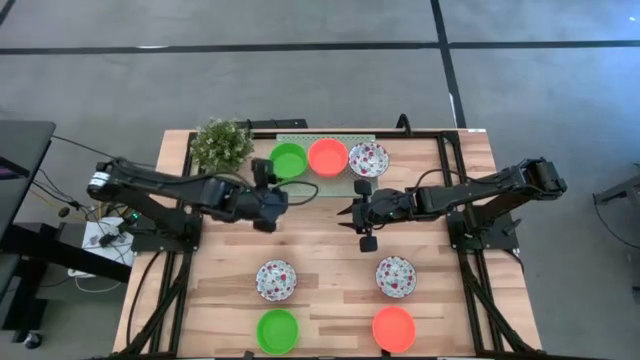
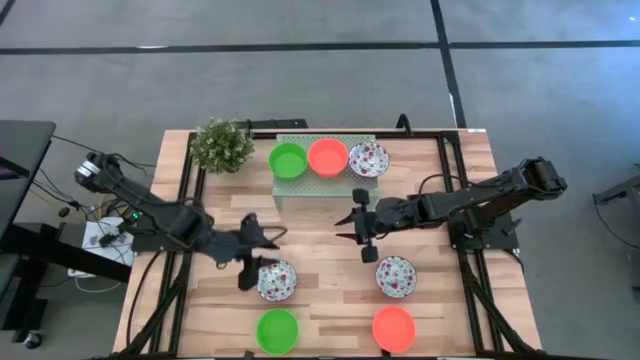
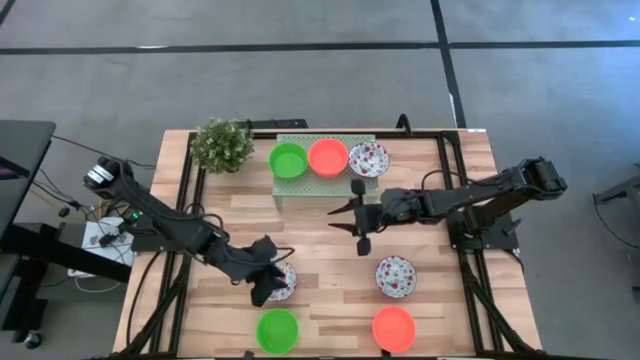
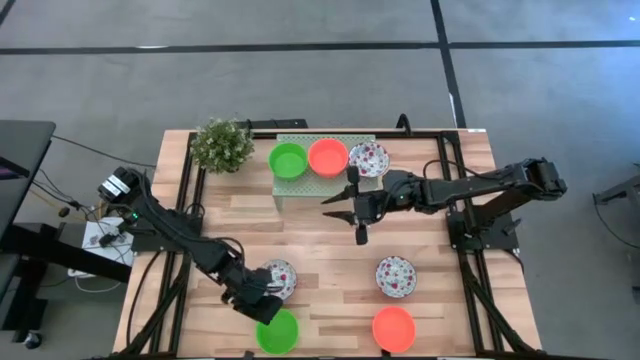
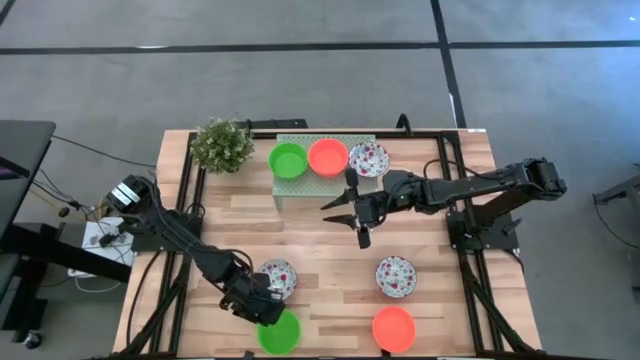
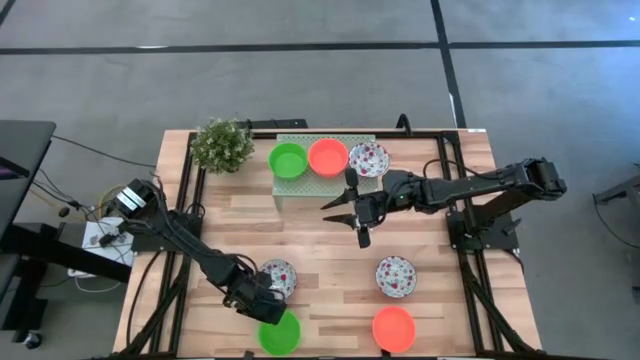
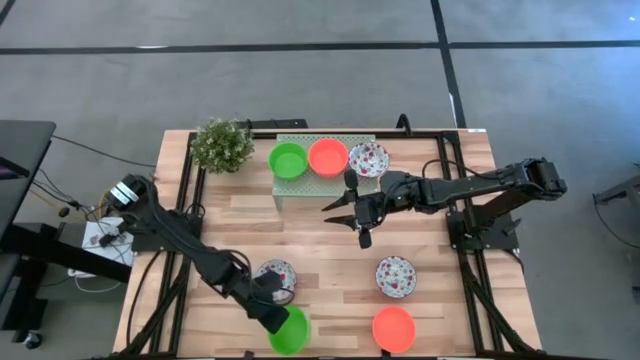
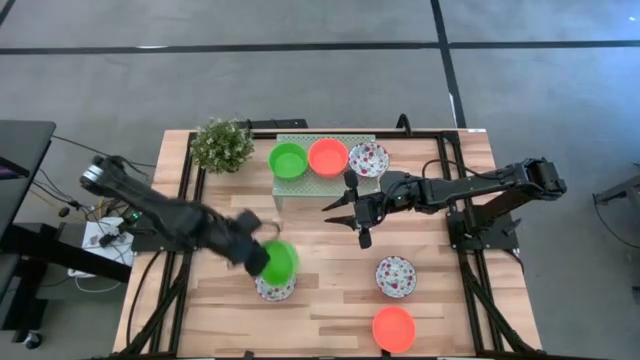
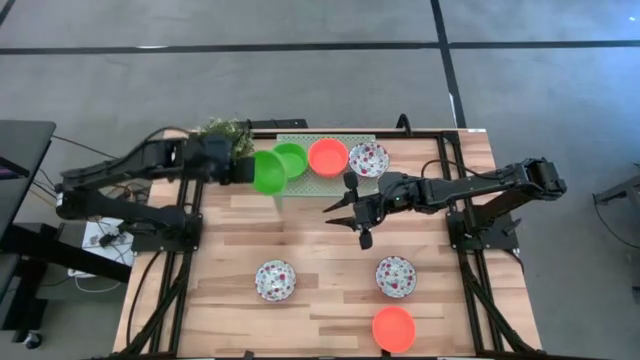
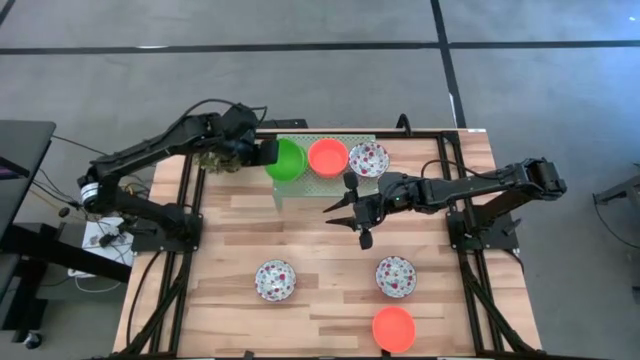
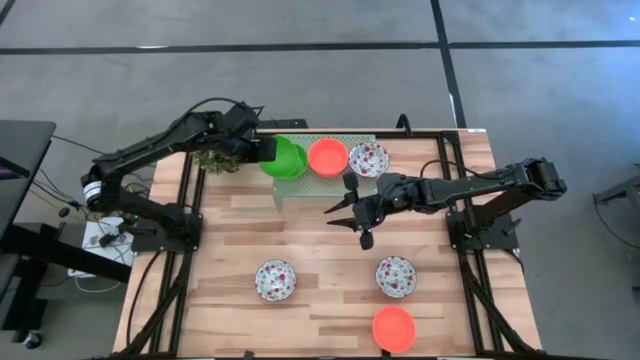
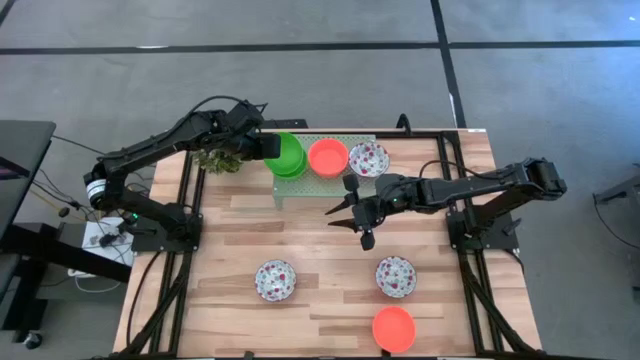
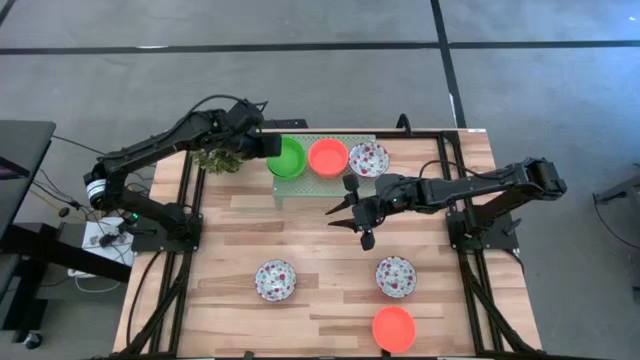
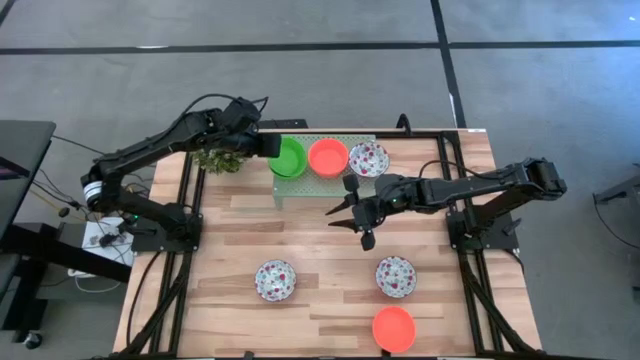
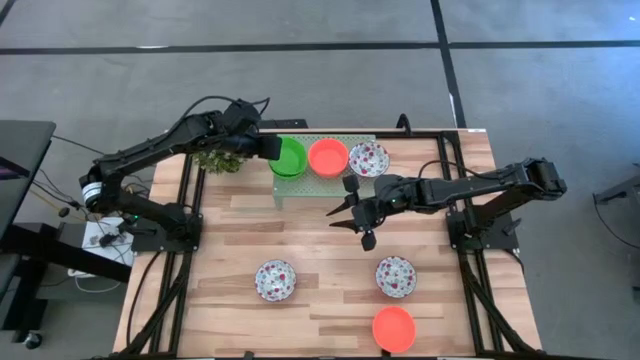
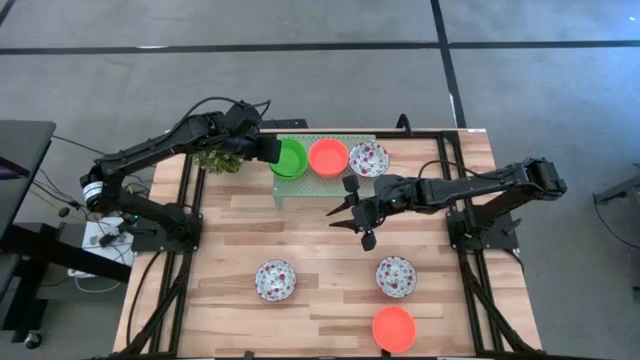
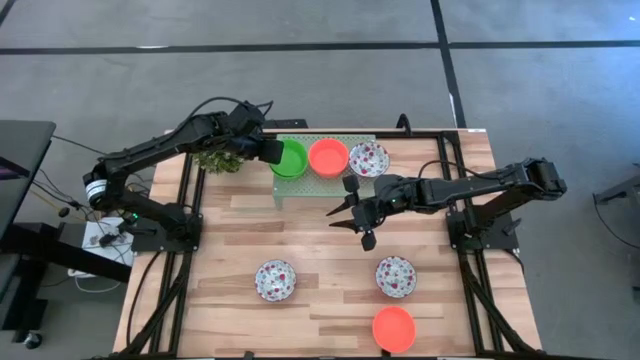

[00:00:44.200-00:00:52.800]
Task: Pick & Place Mini bowls
Stack the green bowl on the green bowl on the shelf

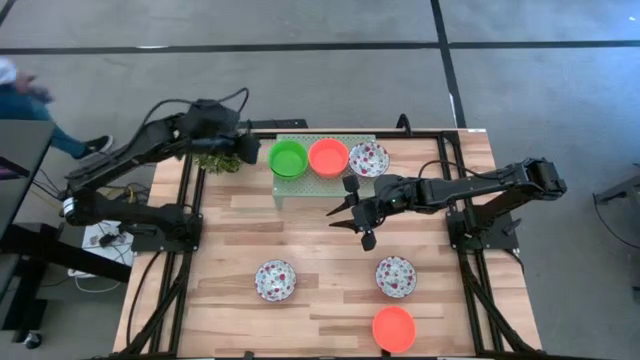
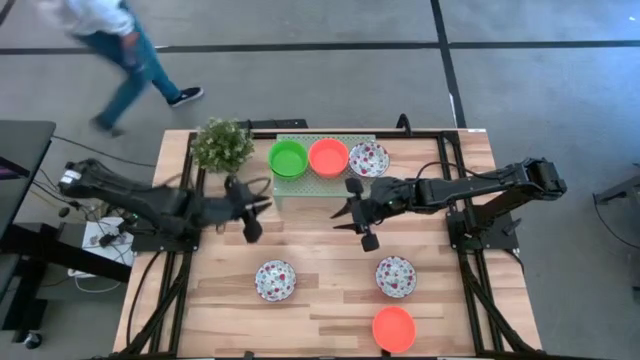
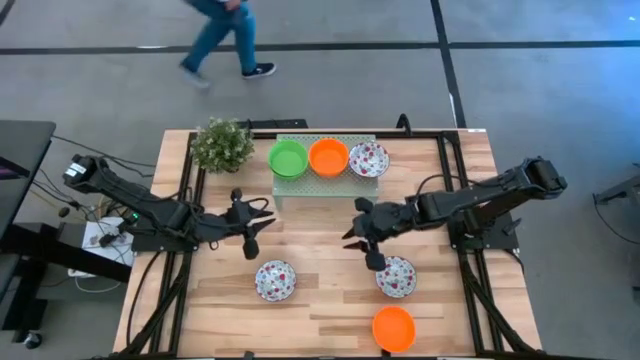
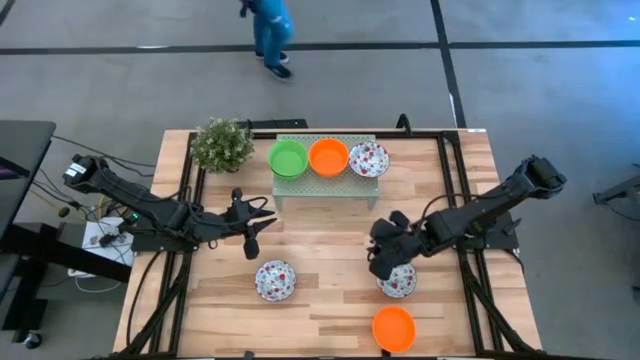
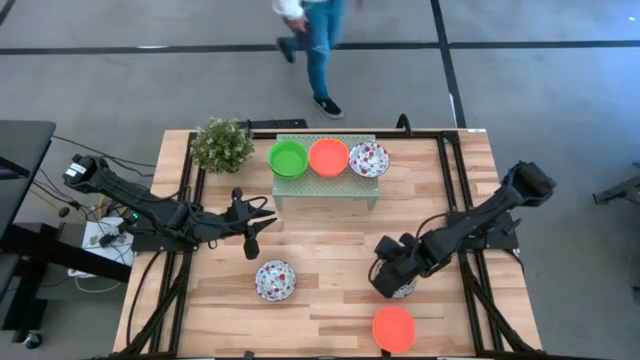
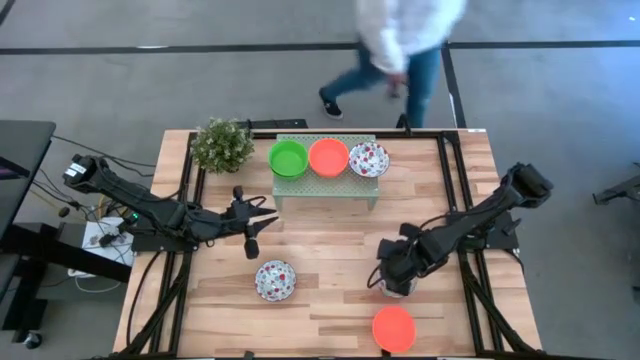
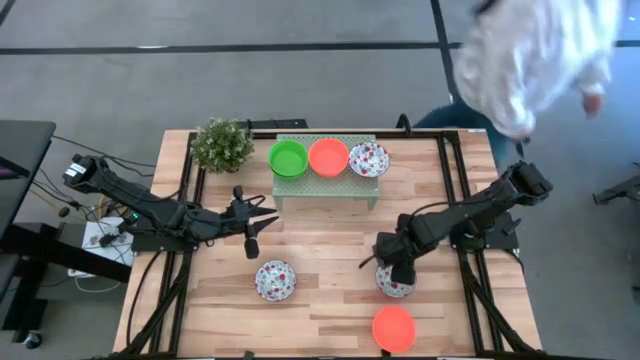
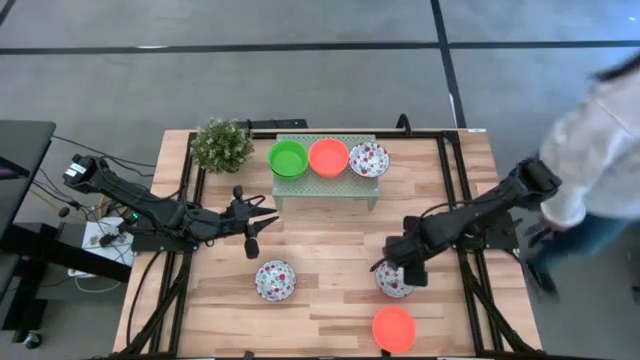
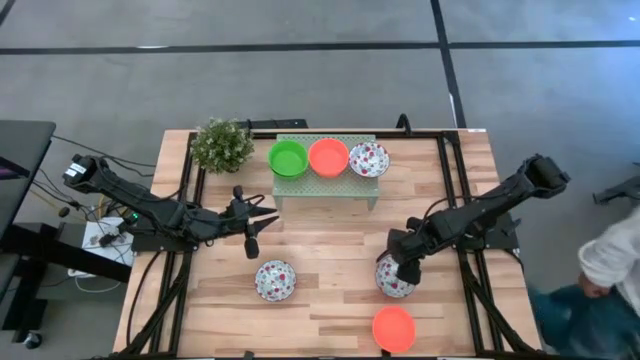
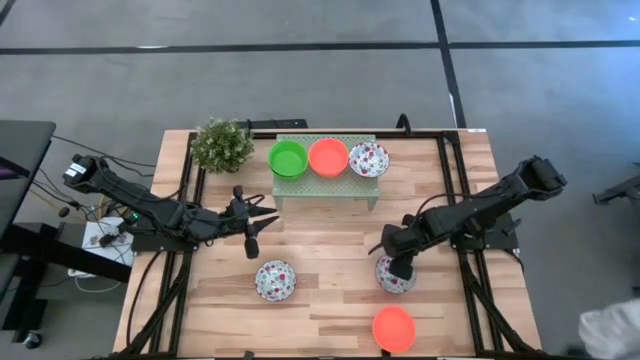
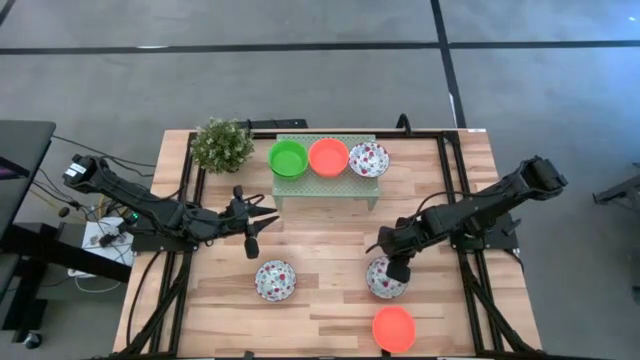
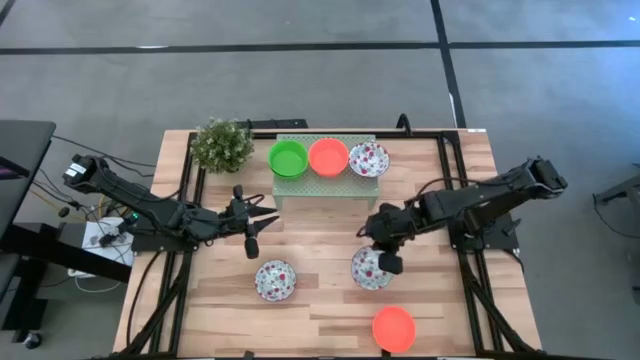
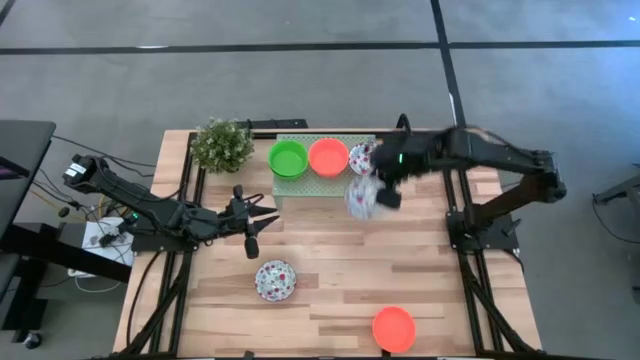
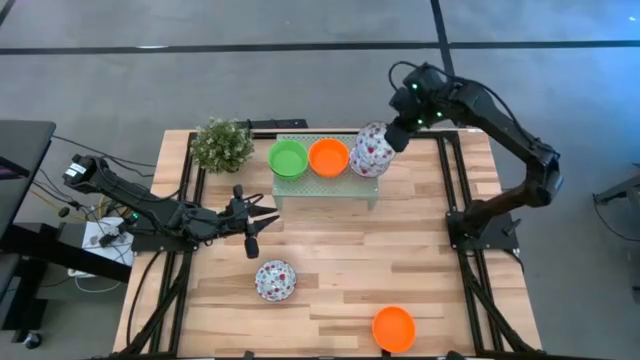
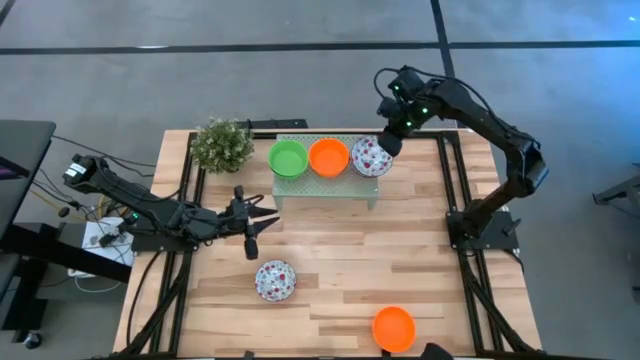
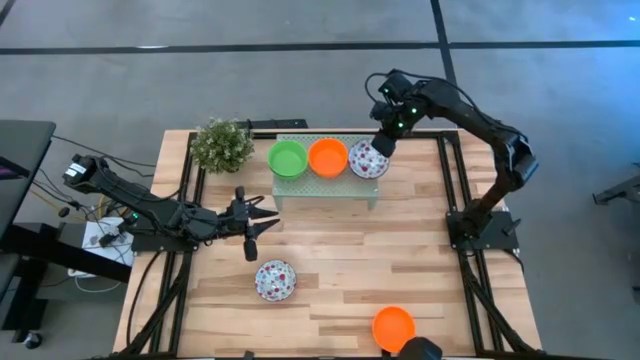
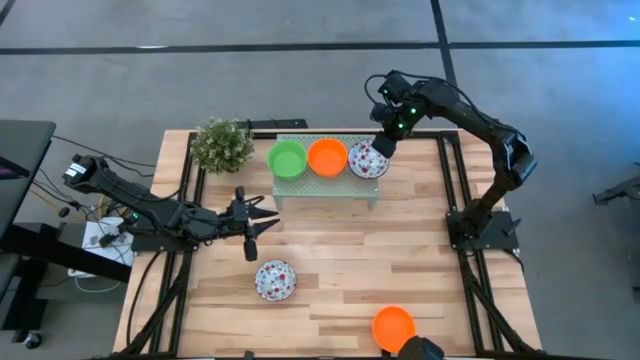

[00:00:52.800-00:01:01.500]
Stack the white bowl on the white bowl on the shelf

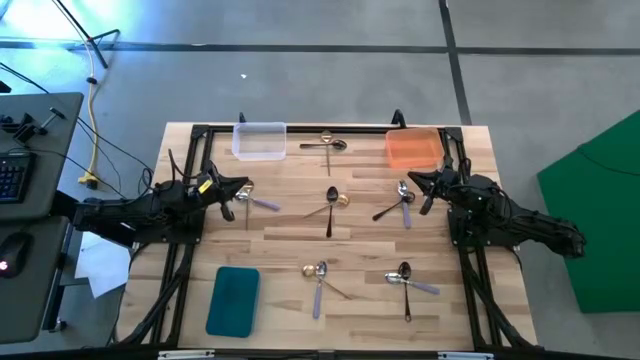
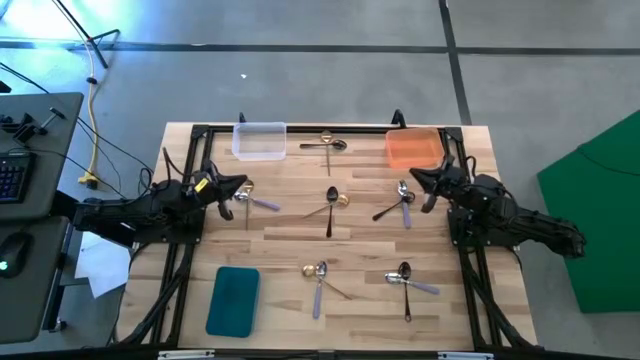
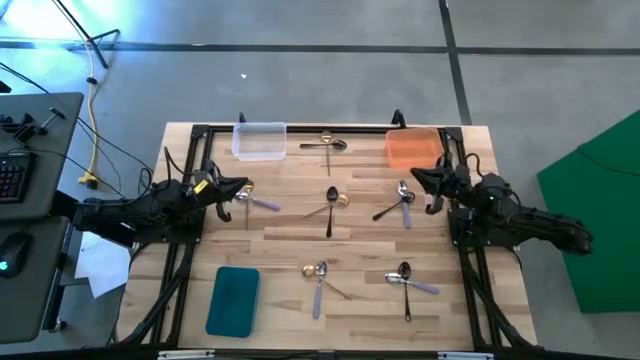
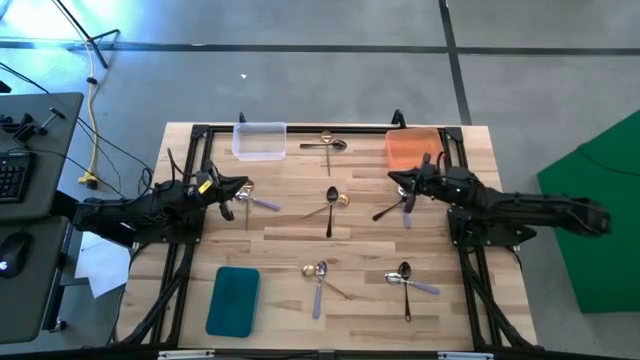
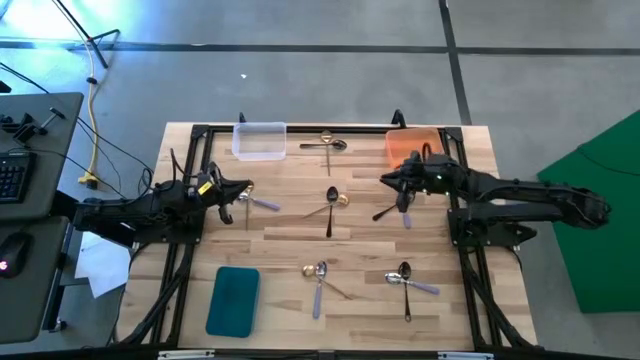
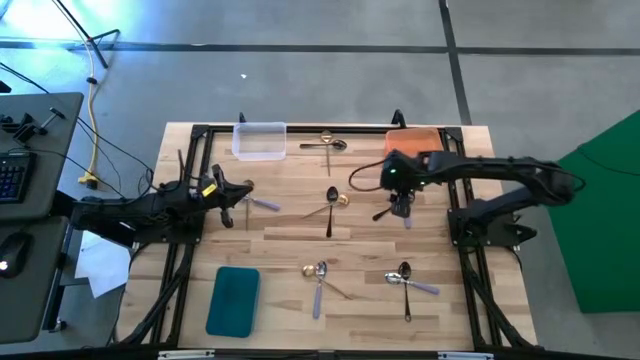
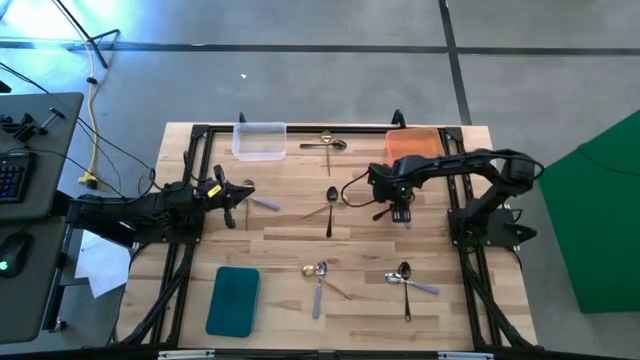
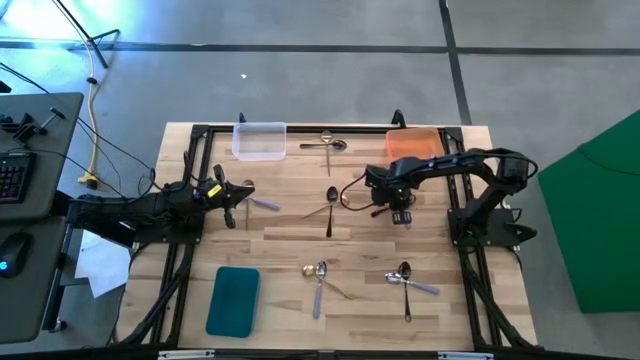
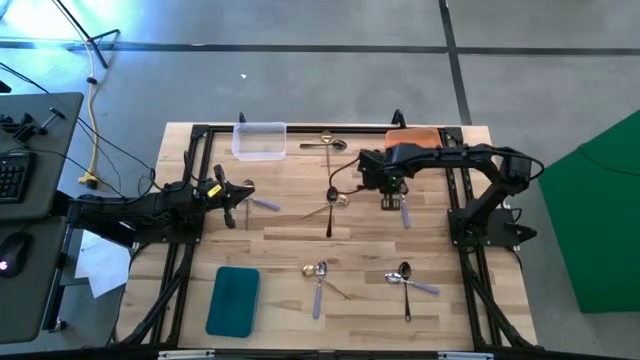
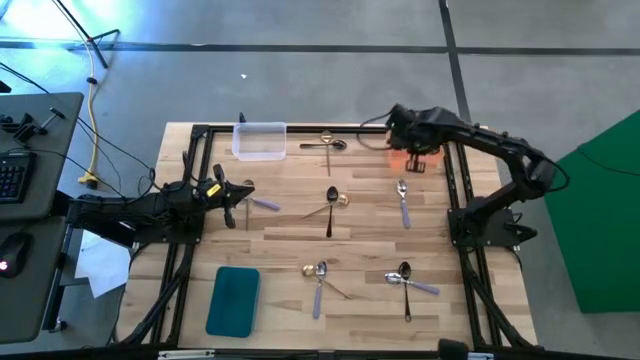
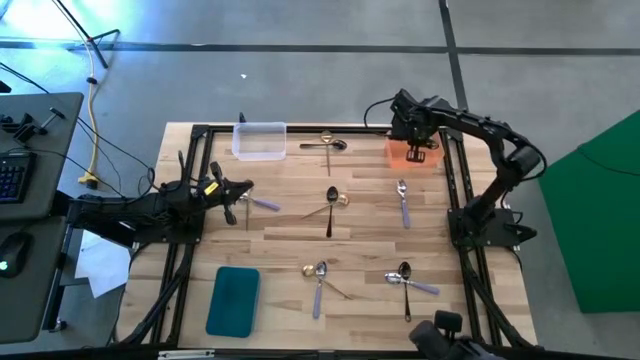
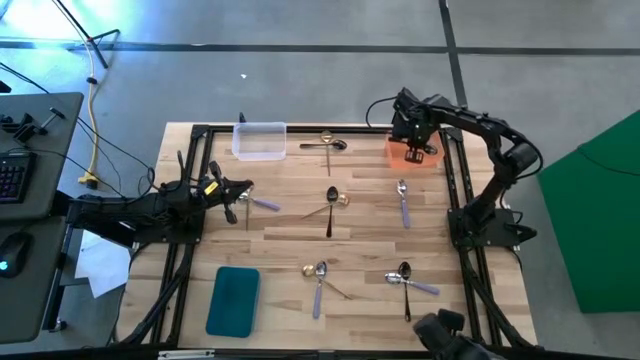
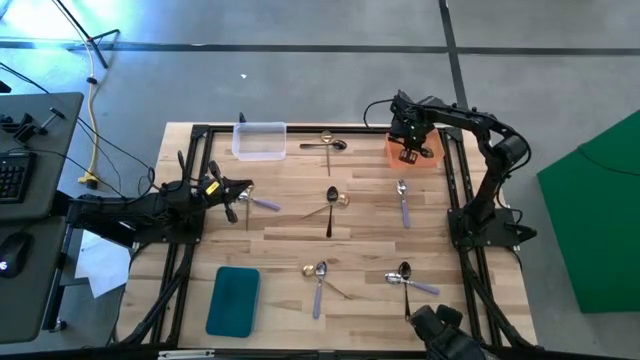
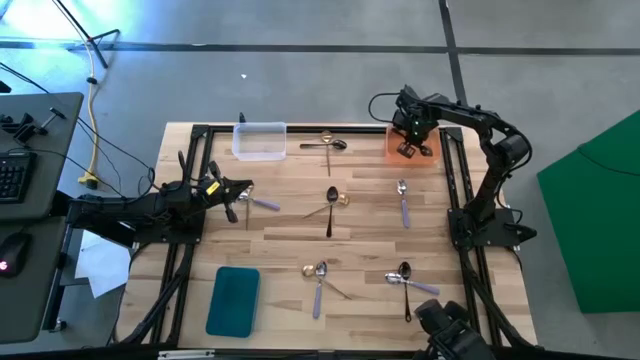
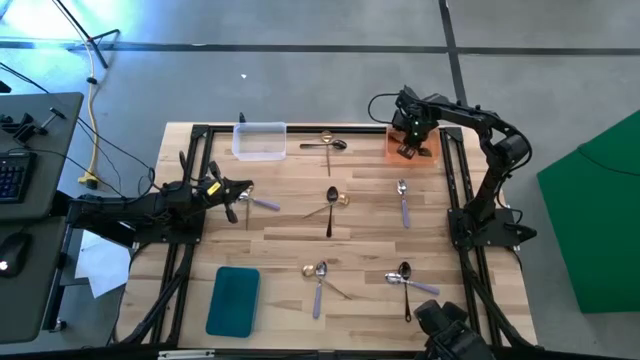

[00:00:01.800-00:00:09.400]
Task: Sort silverware by color (type)
Put the middle right black spoon into the orange bin
